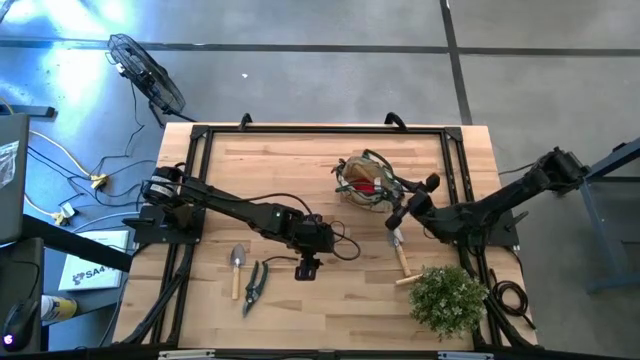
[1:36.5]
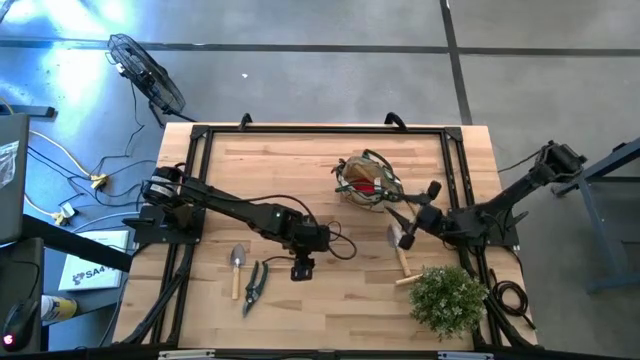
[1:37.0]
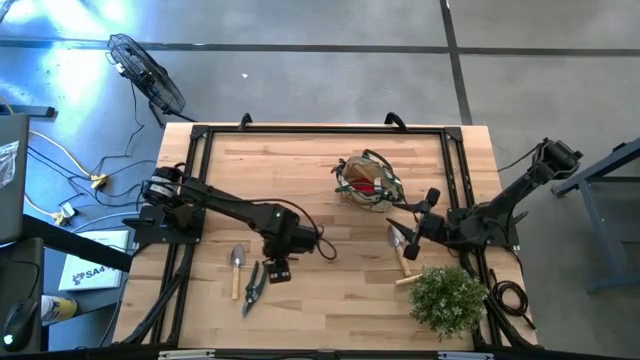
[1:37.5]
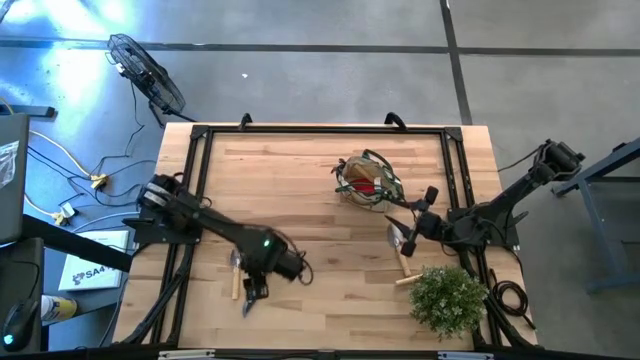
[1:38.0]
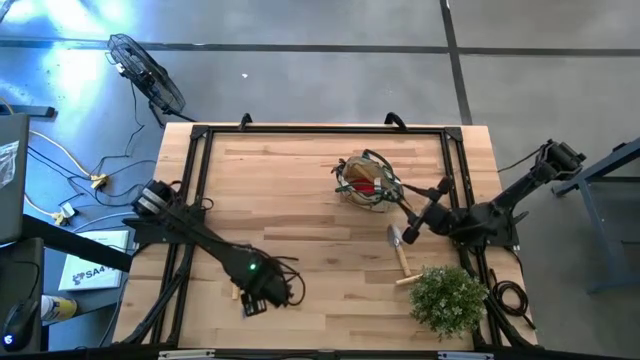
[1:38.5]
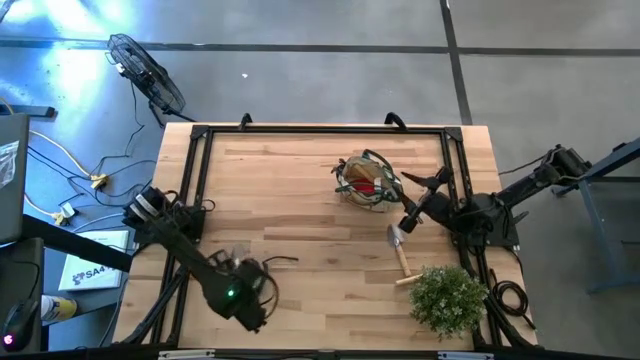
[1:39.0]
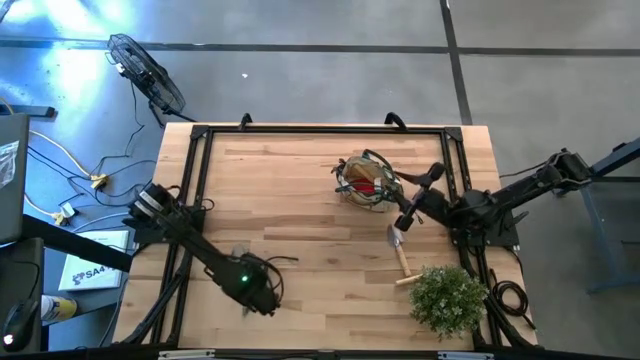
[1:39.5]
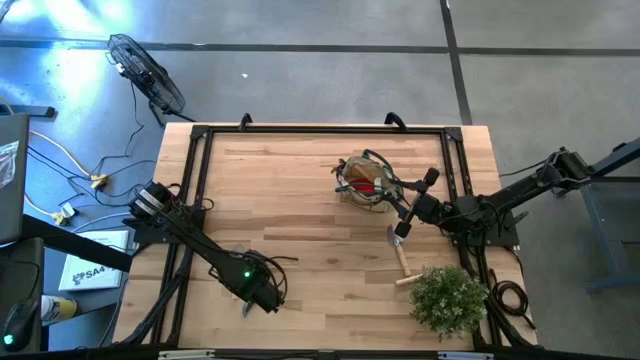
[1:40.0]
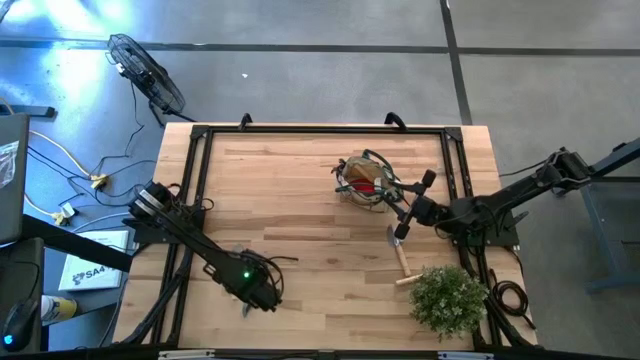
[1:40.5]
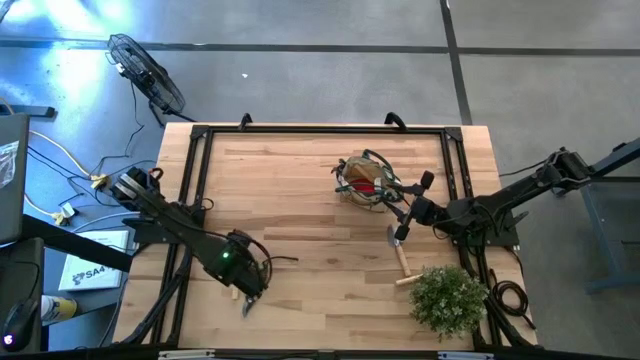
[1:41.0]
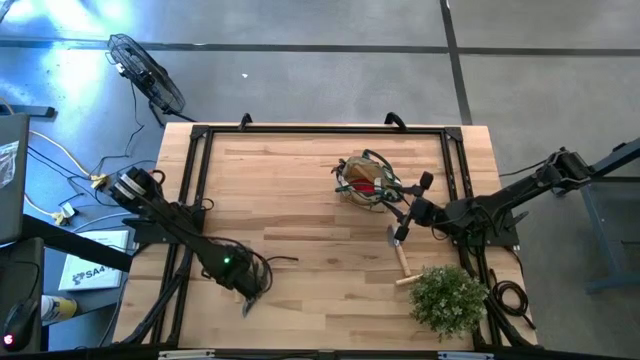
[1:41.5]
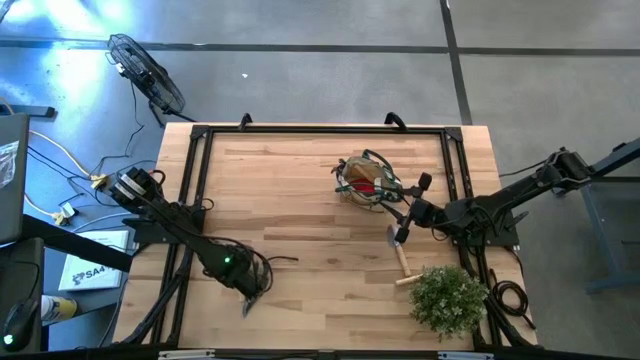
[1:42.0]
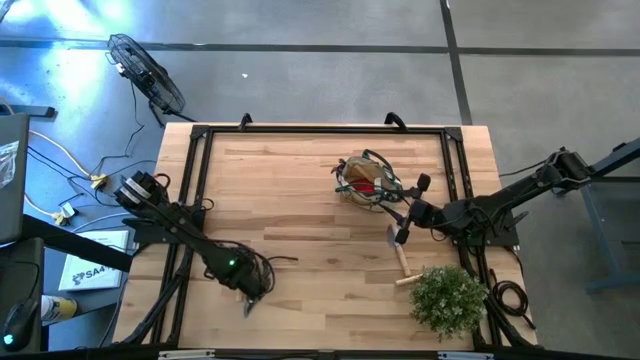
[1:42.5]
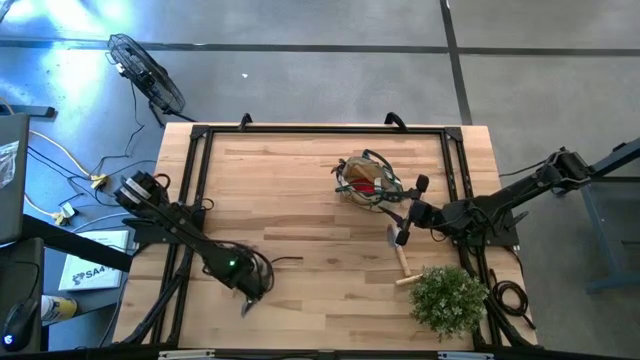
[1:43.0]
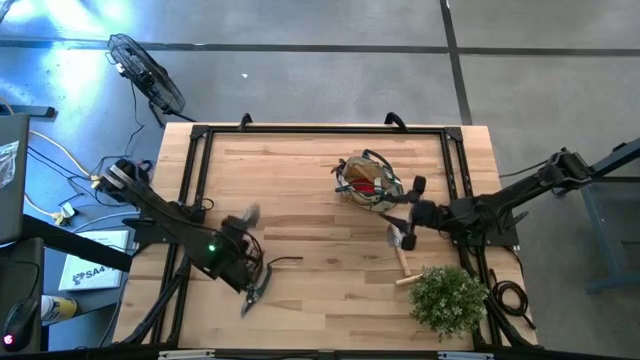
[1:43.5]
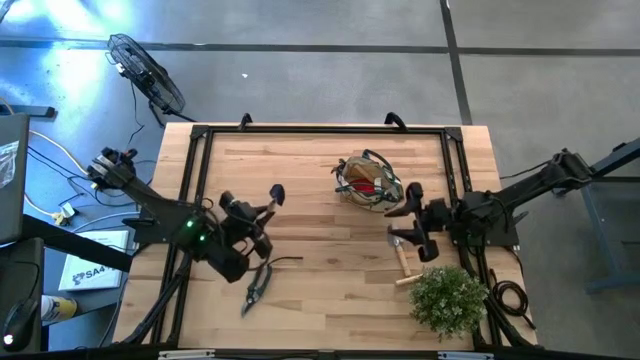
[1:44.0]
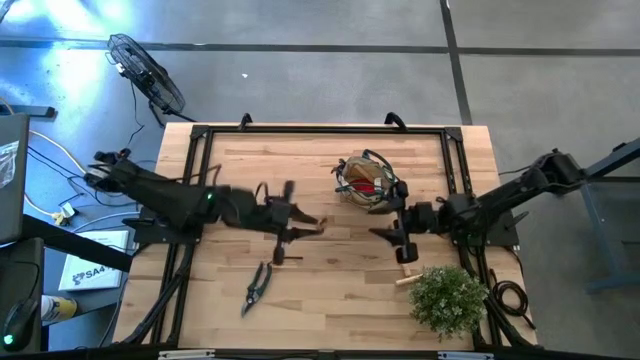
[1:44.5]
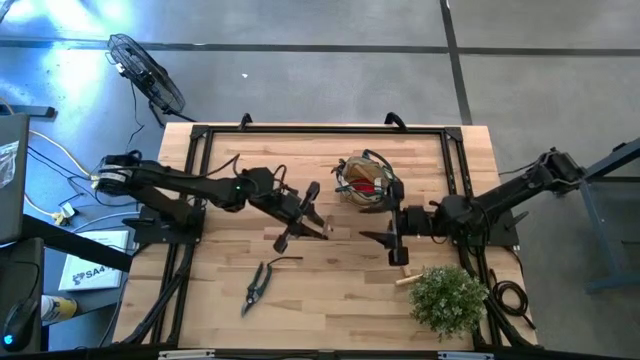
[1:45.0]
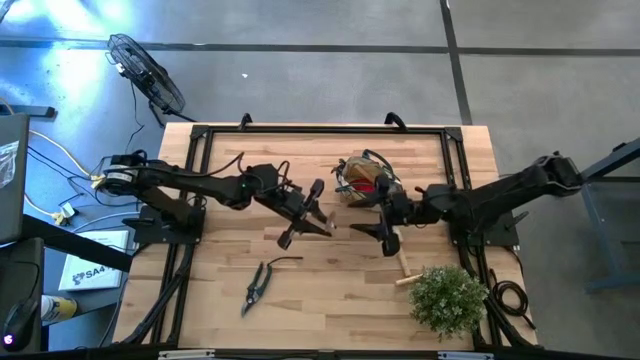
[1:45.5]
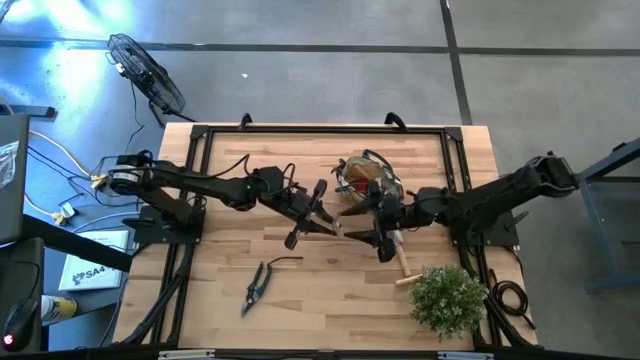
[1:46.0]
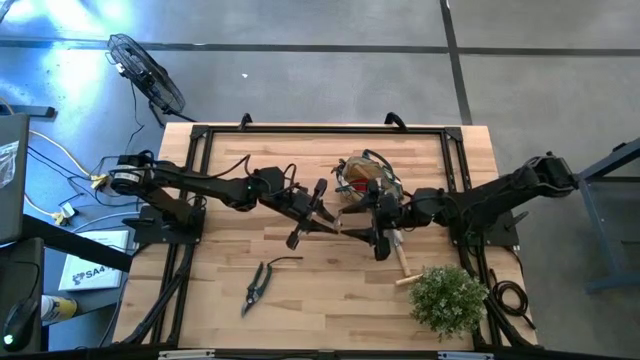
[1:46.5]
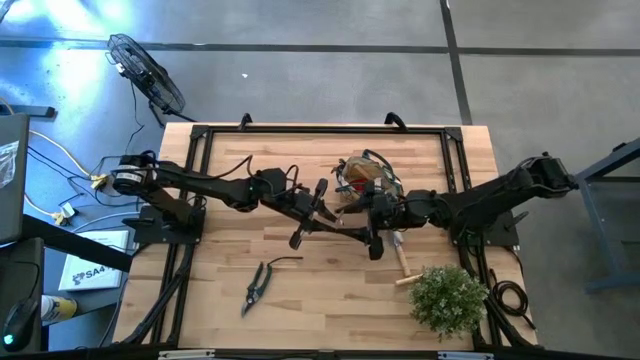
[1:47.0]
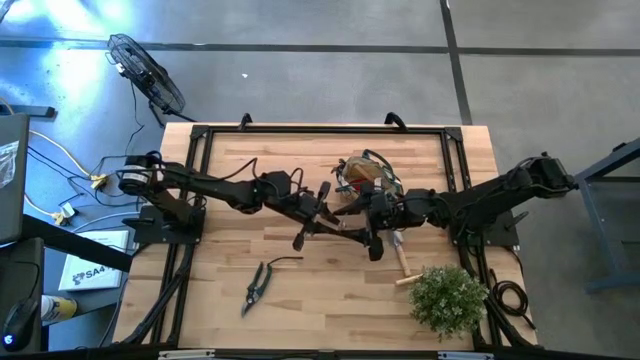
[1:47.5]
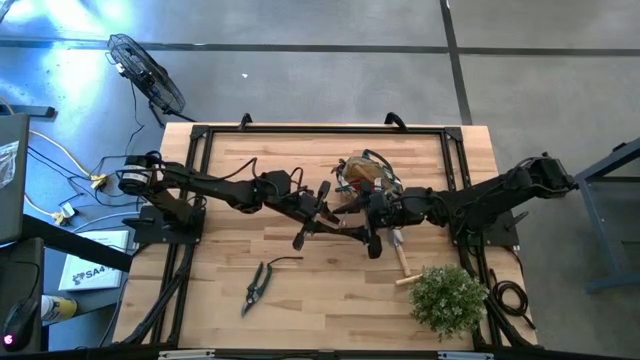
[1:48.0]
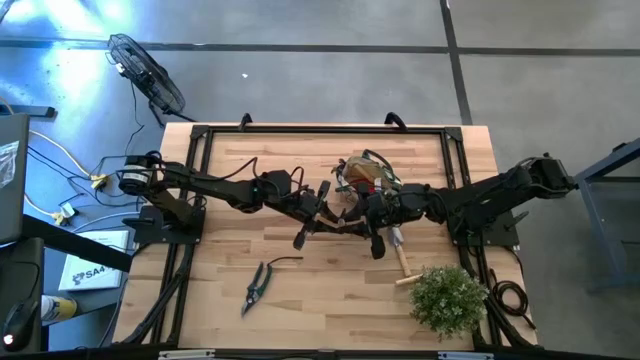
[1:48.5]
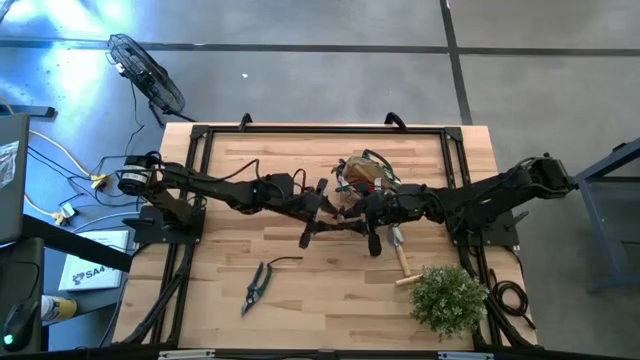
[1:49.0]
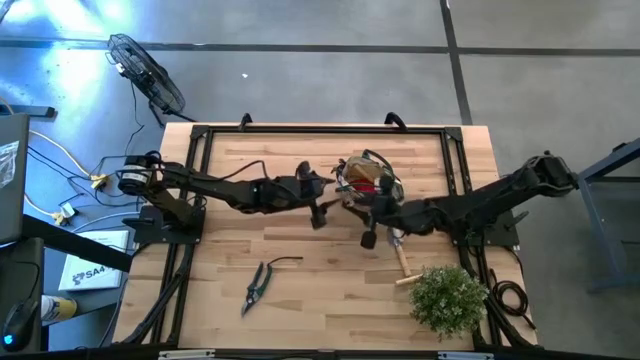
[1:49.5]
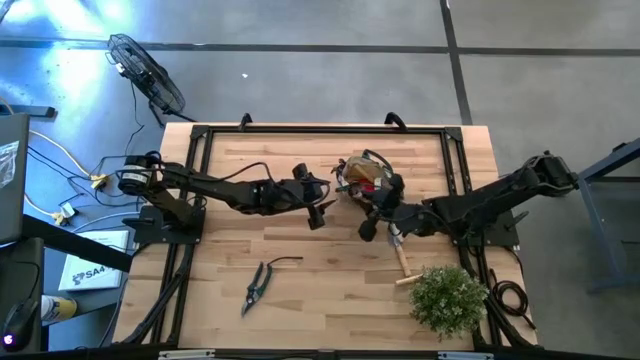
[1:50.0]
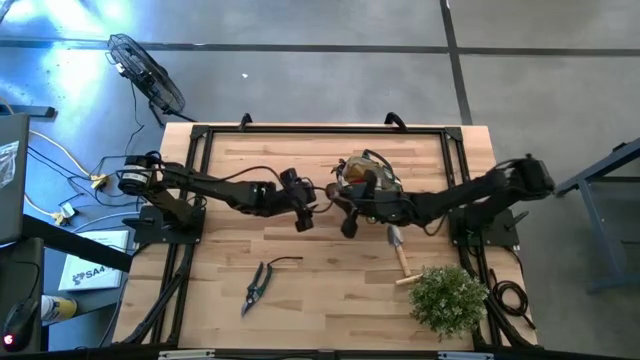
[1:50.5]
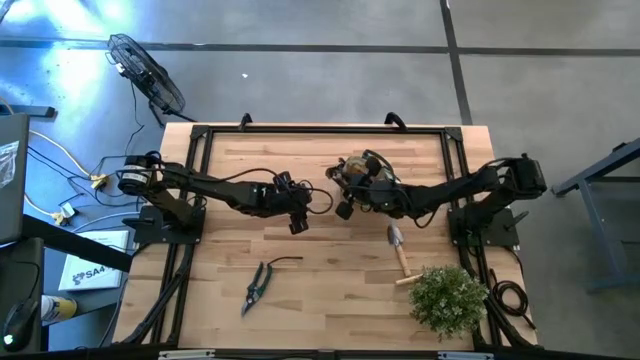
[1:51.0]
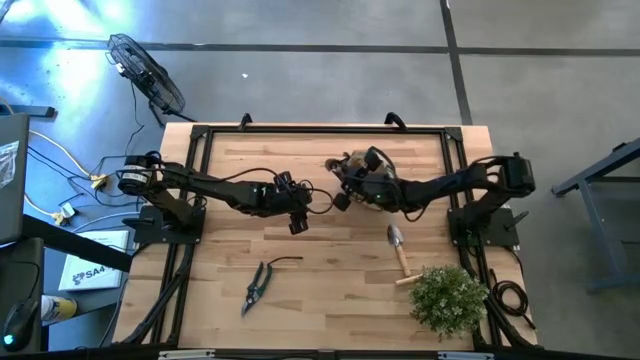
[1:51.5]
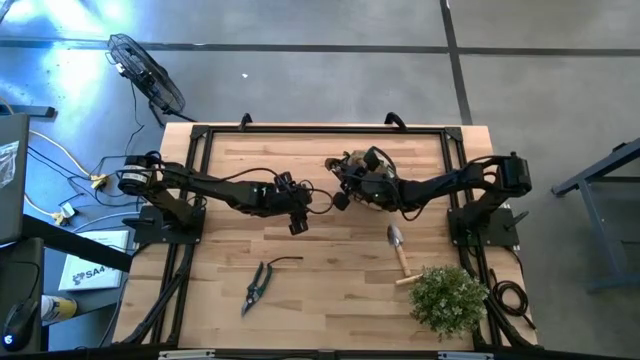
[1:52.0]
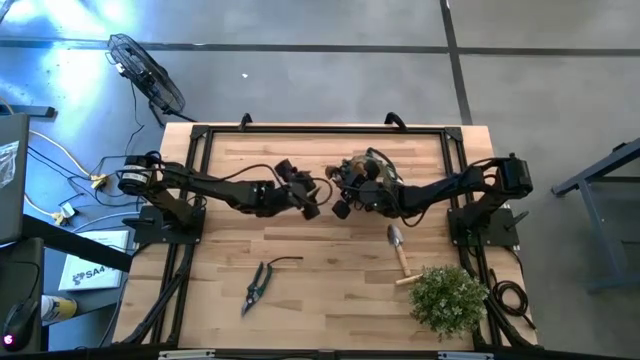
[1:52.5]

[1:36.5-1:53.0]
Task: Pick & Place Garden tools in Gardening bag
Put the bottom left brown trowel into the light brown gardening bag

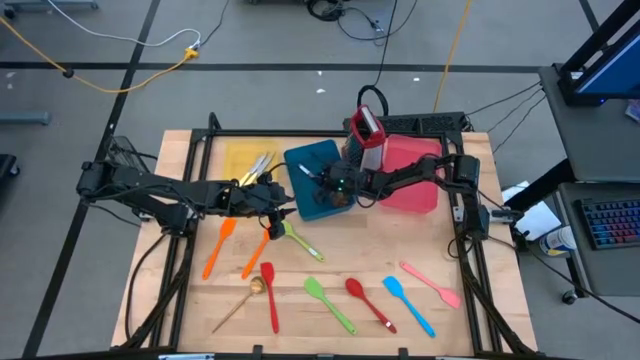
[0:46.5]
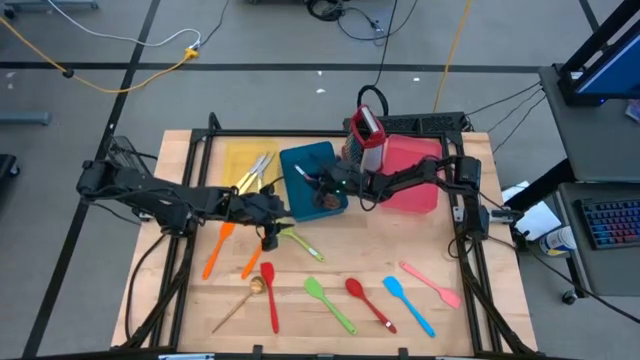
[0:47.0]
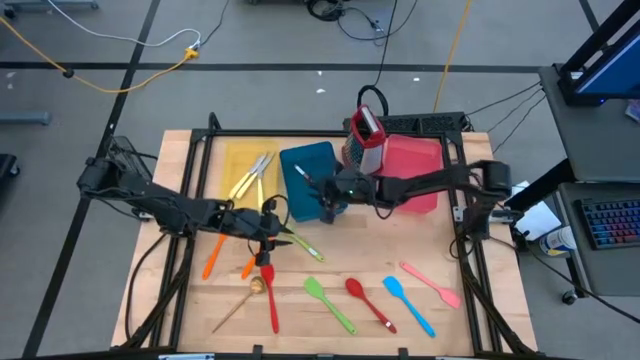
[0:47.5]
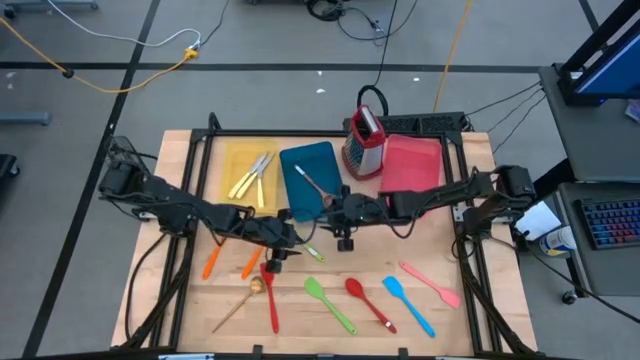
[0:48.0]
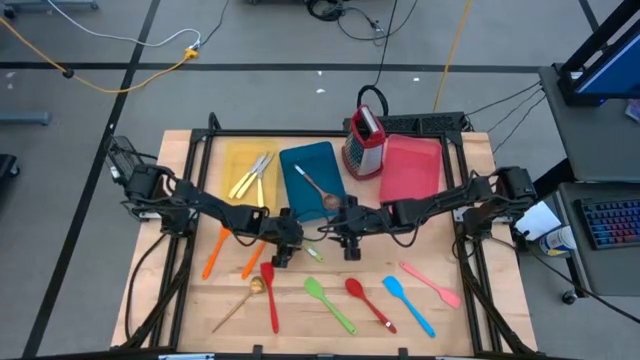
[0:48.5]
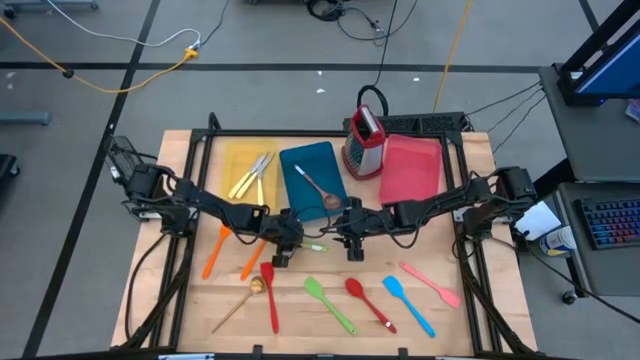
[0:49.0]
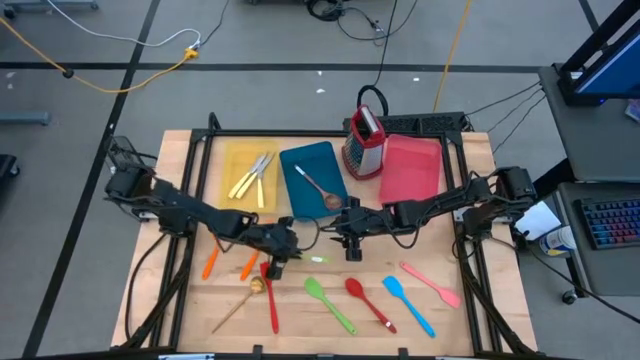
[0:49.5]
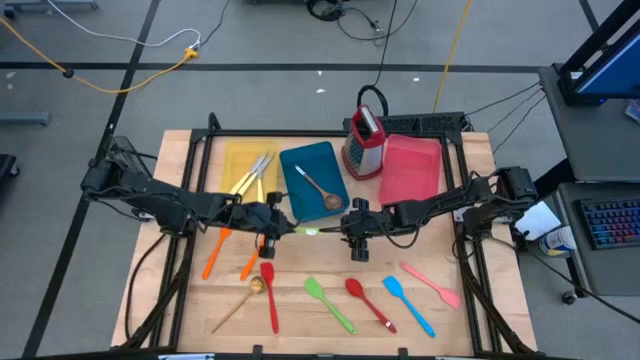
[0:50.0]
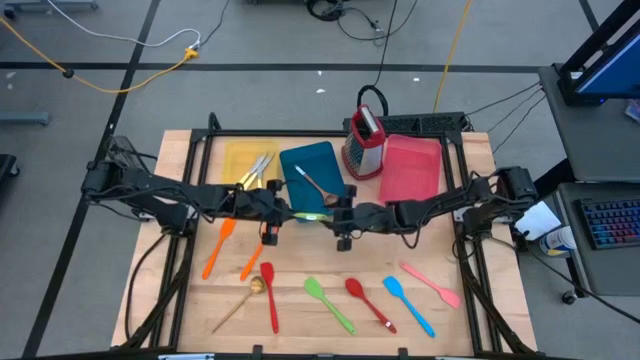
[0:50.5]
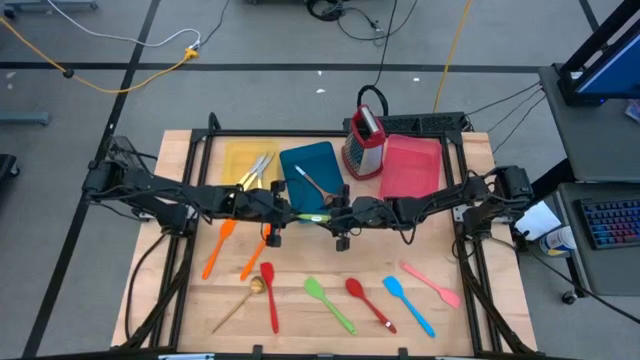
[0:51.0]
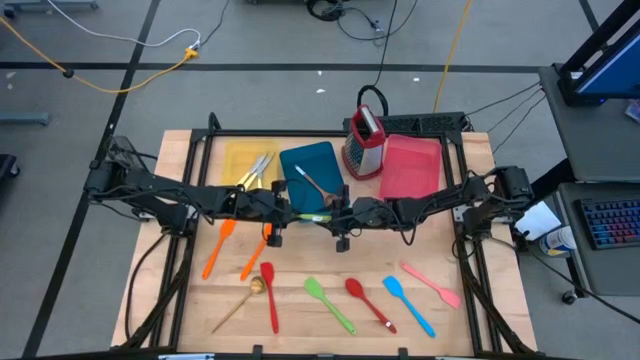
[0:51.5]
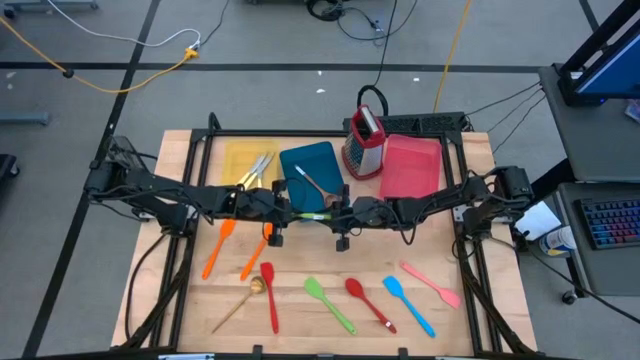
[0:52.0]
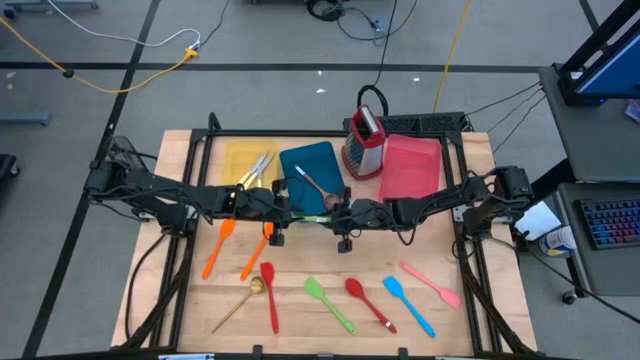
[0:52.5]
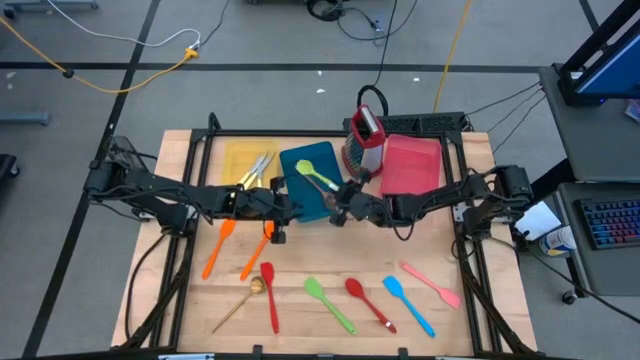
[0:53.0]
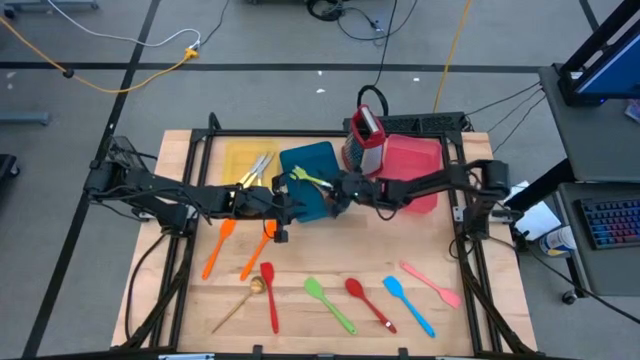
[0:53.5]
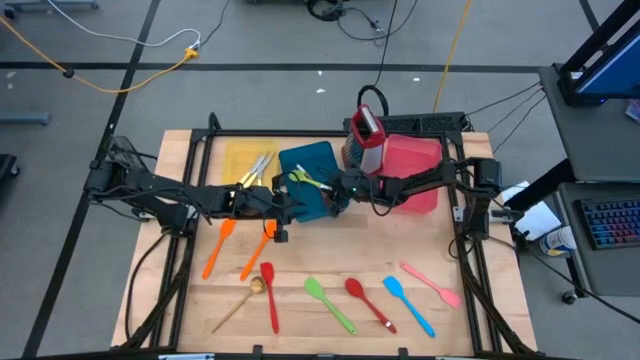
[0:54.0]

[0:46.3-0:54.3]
Task: Pick & Place Kitchen Items
Put the green serving spoon into the blue bin
